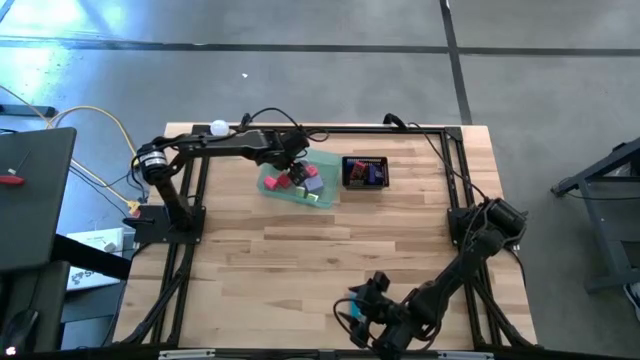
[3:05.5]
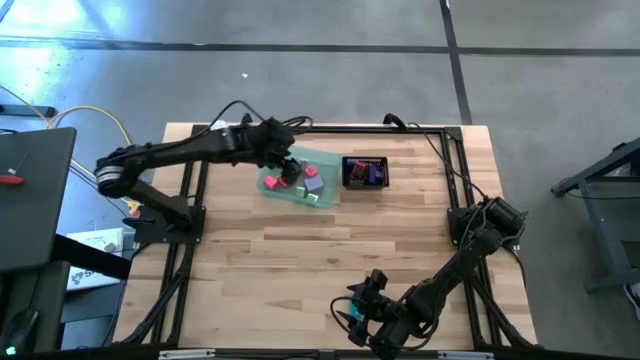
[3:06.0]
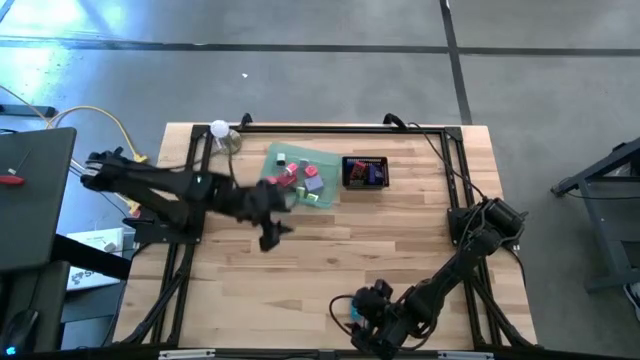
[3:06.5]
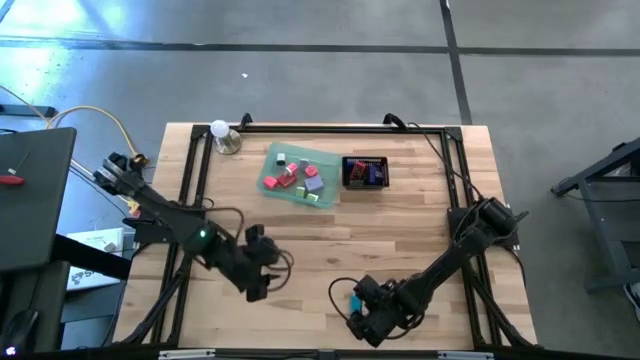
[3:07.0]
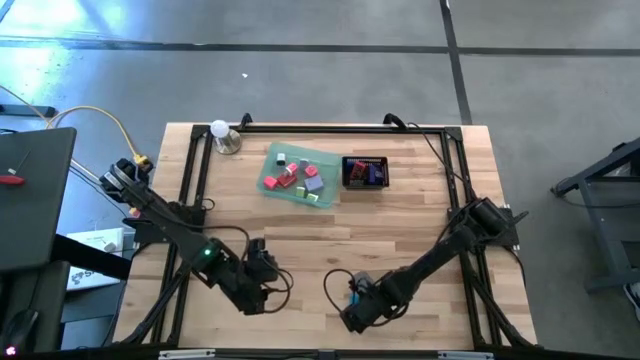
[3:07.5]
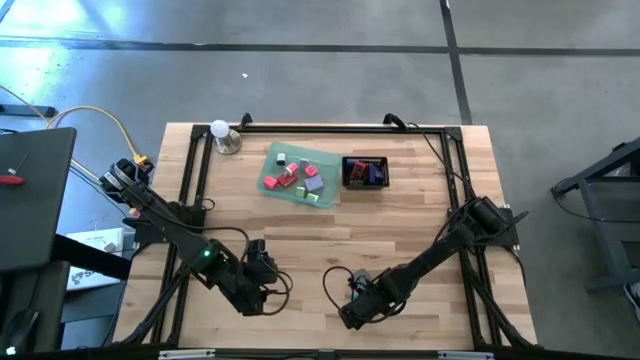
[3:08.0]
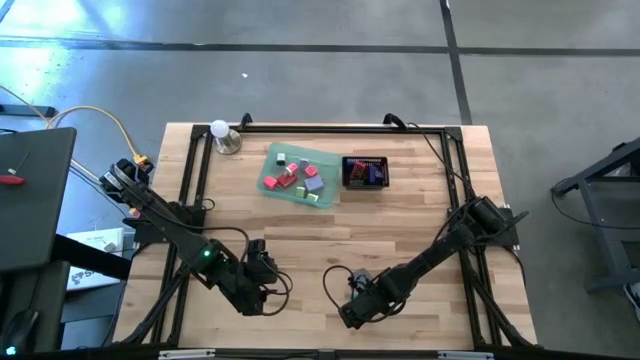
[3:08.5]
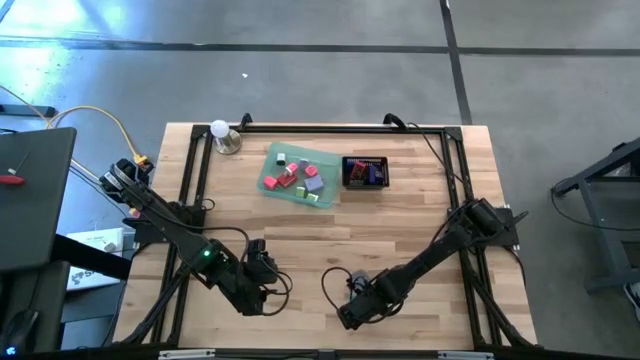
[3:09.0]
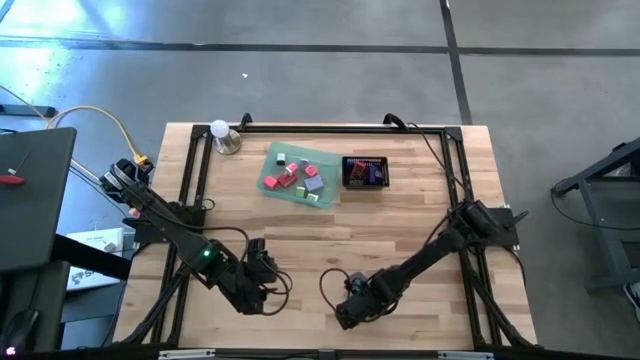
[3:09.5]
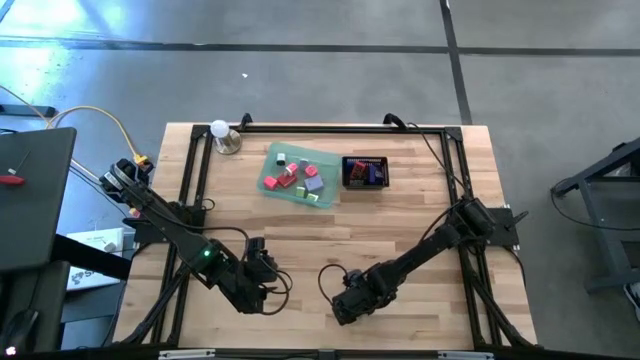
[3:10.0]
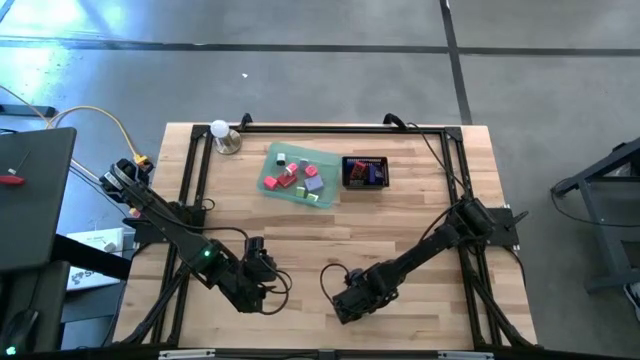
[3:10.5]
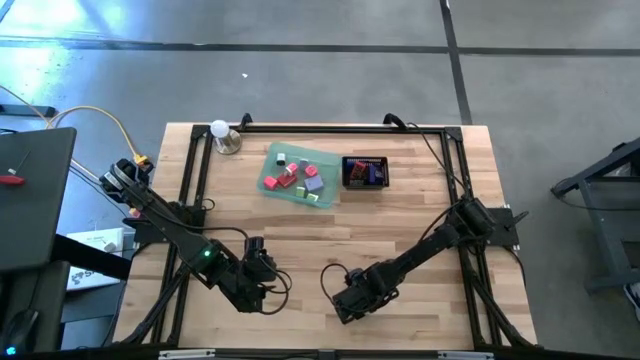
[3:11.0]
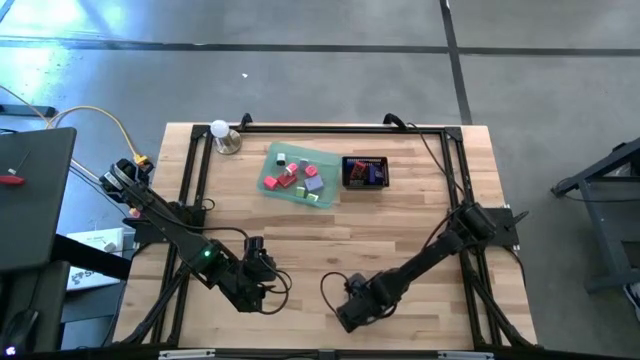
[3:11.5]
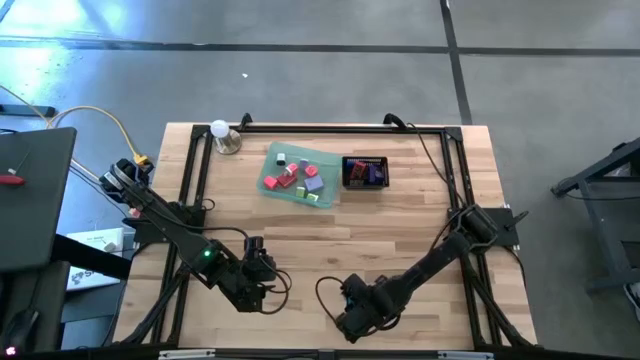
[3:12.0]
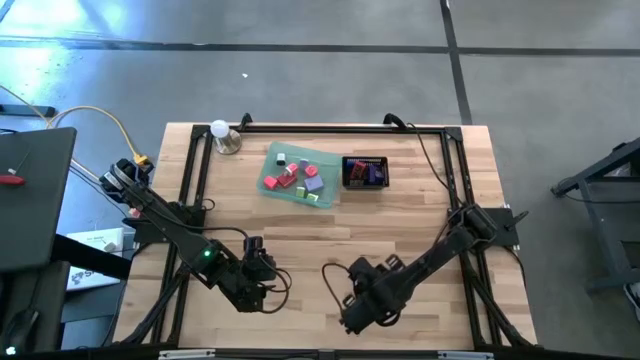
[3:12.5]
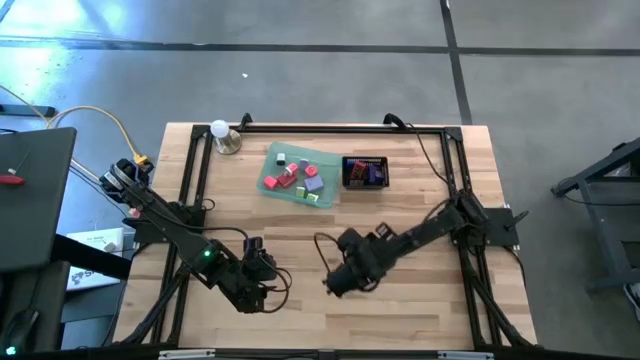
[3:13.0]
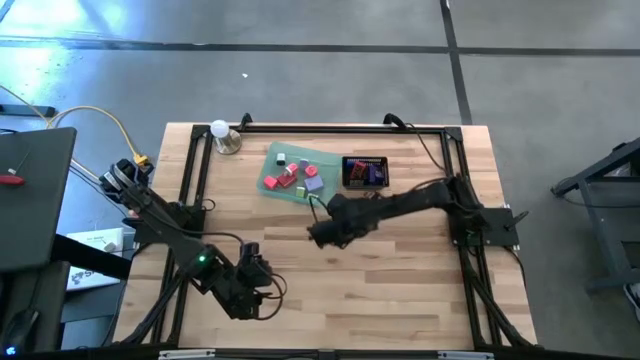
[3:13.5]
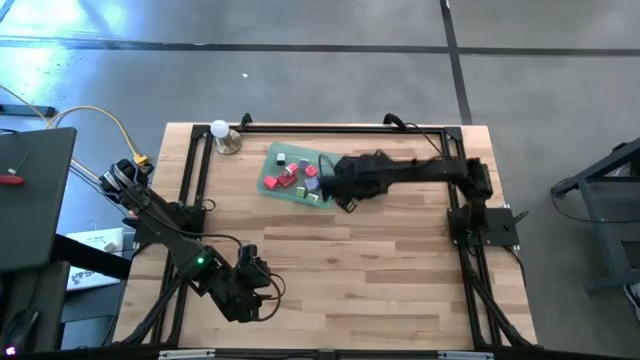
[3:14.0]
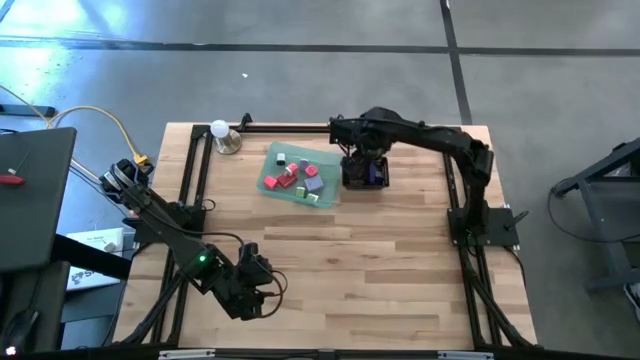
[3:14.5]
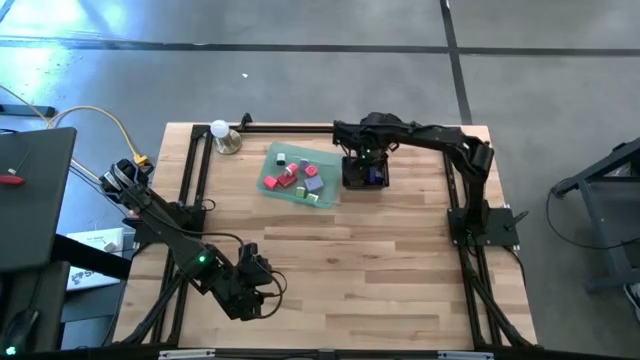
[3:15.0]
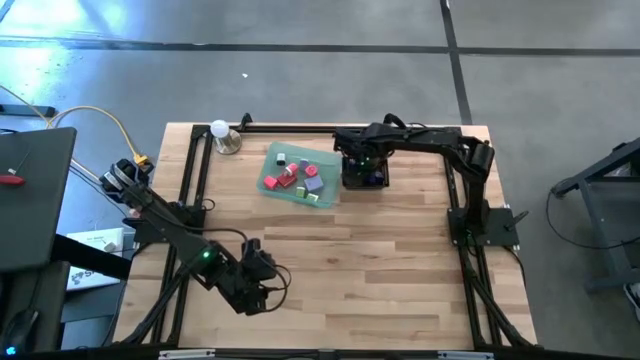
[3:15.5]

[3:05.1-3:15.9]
Task: Pick & Place Office items
Put the light blue digital timer into the black bin

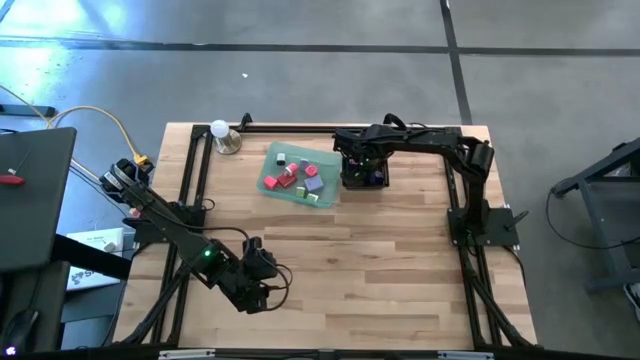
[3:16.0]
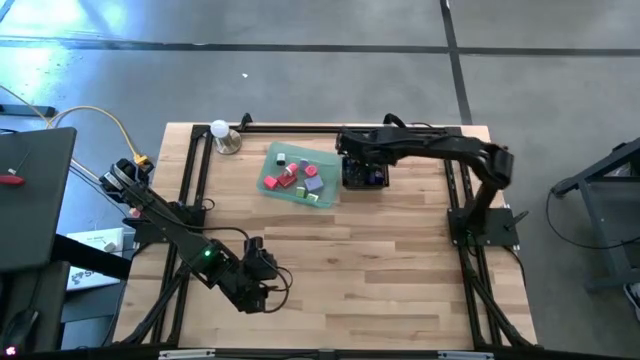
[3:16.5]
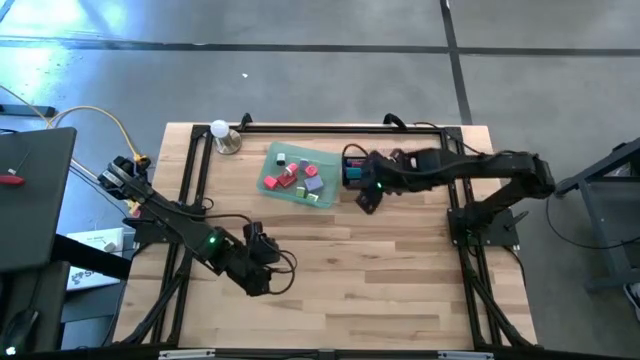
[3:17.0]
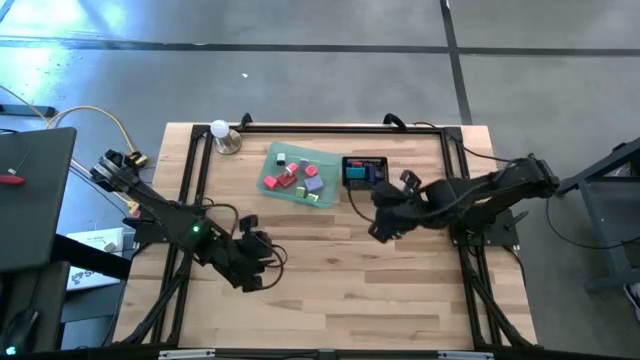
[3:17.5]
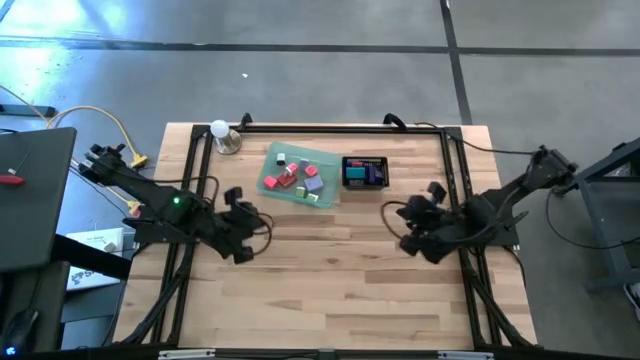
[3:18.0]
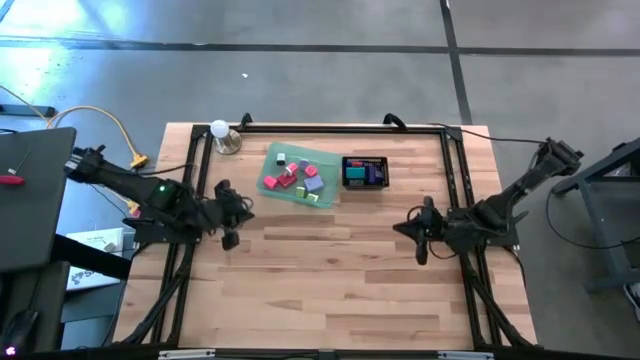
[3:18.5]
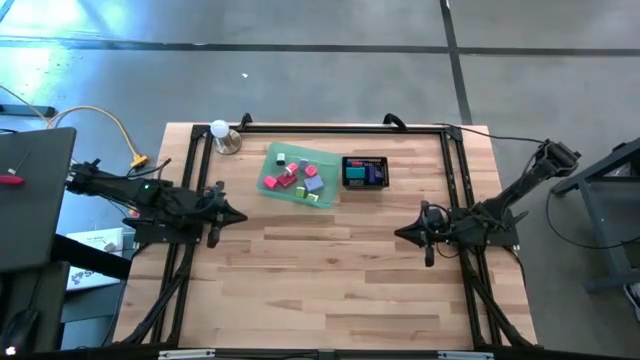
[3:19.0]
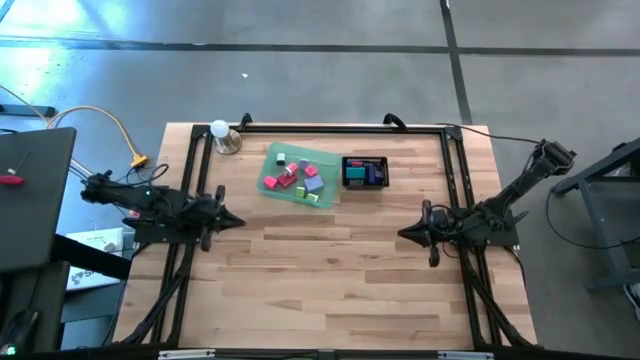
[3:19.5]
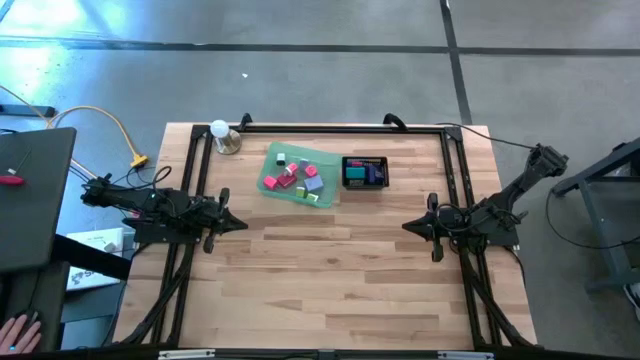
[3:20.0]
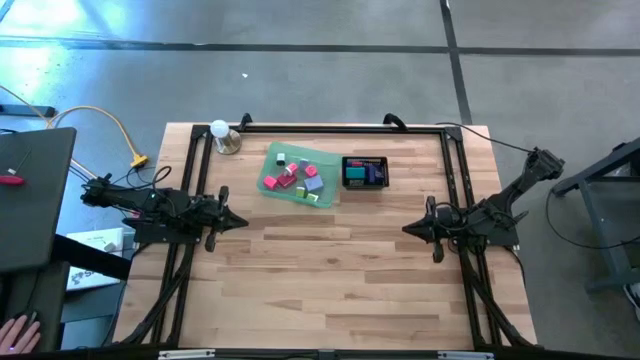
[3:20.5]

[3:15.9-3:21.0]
Return to Home Position

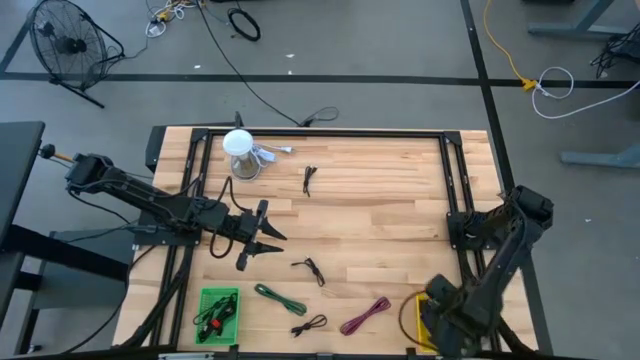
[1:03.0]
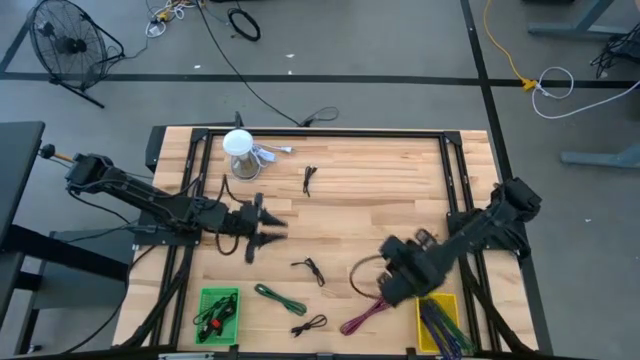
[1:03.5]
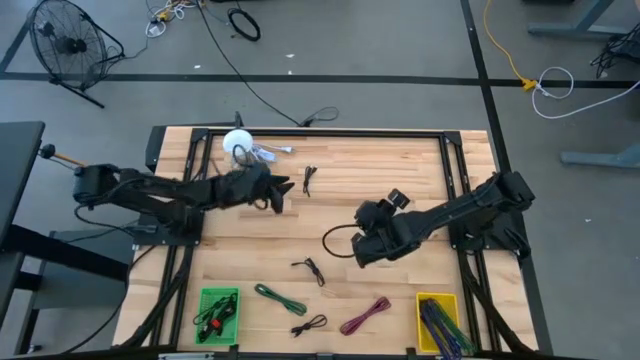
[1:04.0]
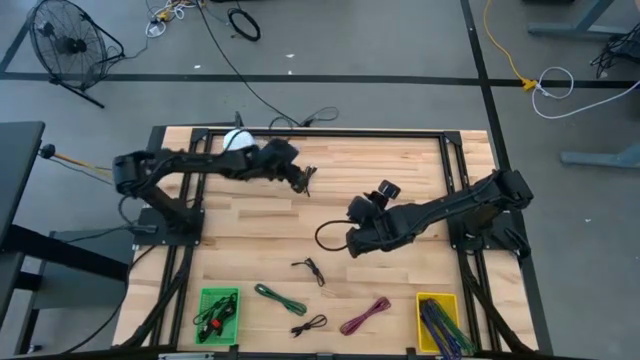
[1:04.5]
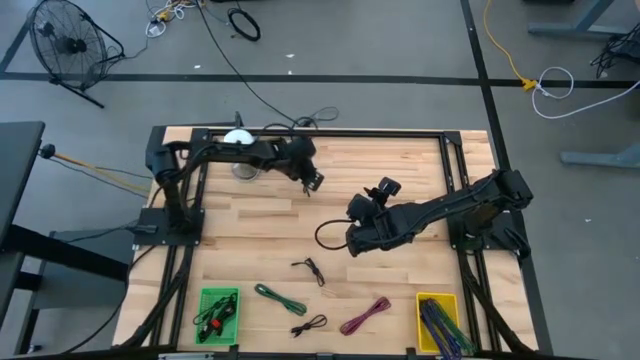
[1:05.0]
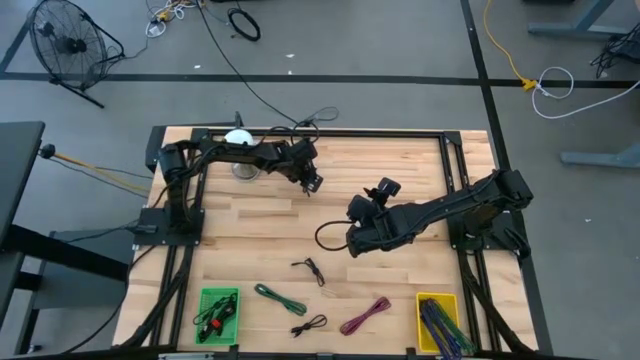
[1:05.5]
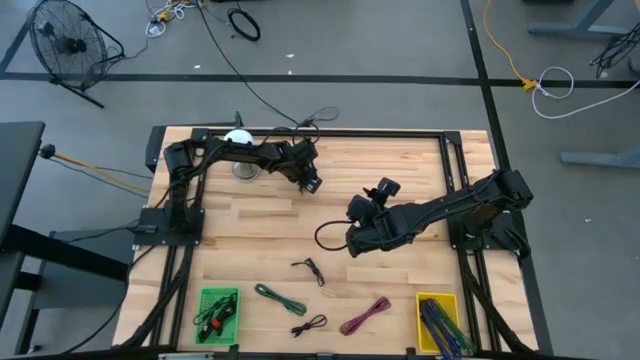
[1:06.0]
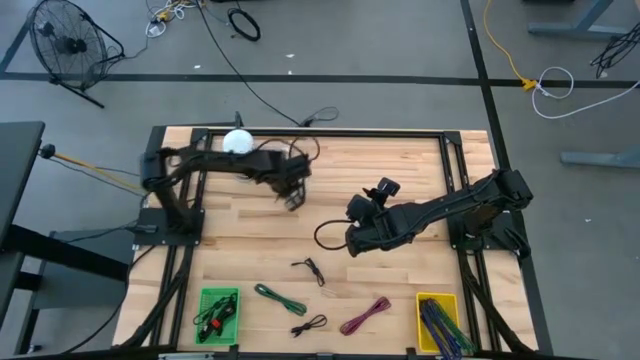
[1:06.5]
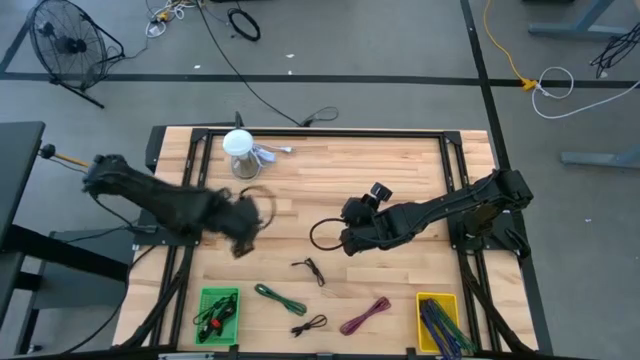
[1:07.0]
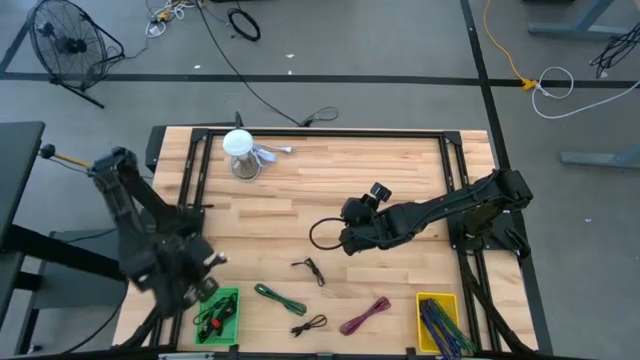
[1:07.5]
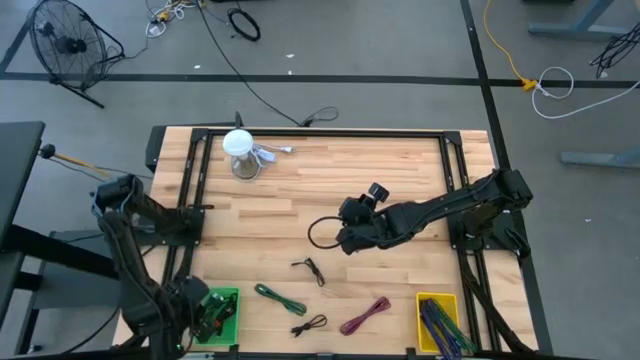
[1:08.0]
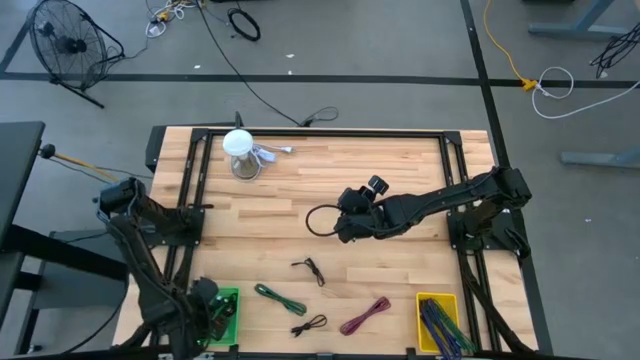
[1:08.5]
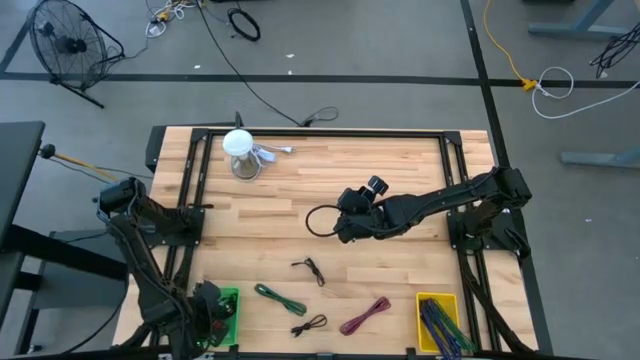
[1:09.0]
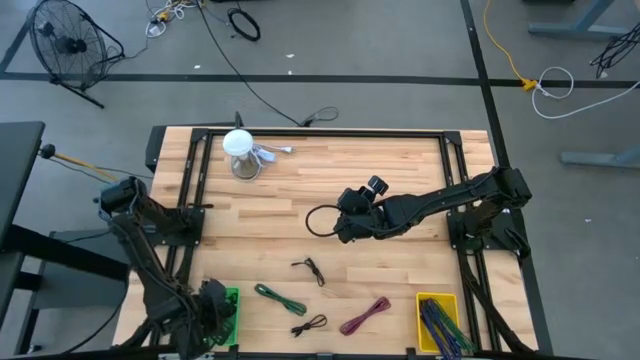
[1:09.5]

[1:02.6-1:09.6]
Task: Pick & Place USB Port
Put the black charger cable into the green bin
